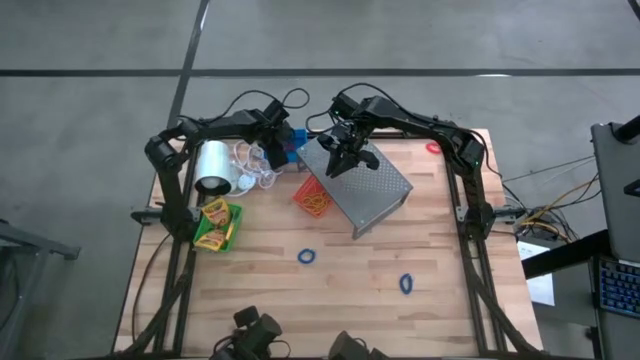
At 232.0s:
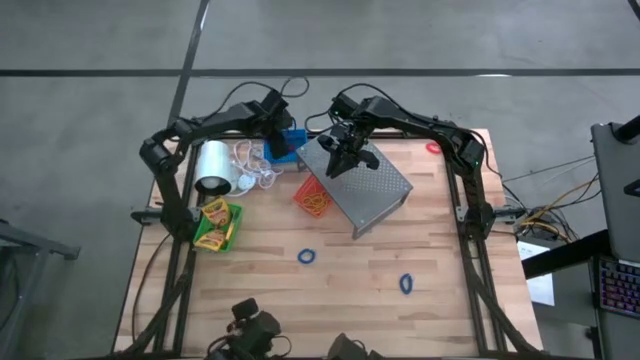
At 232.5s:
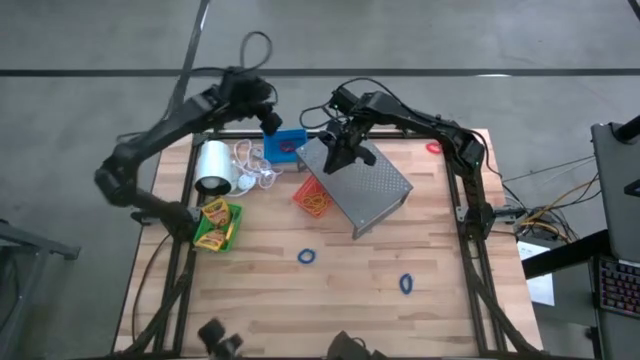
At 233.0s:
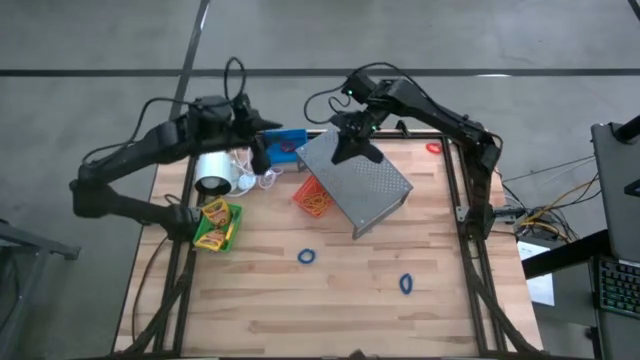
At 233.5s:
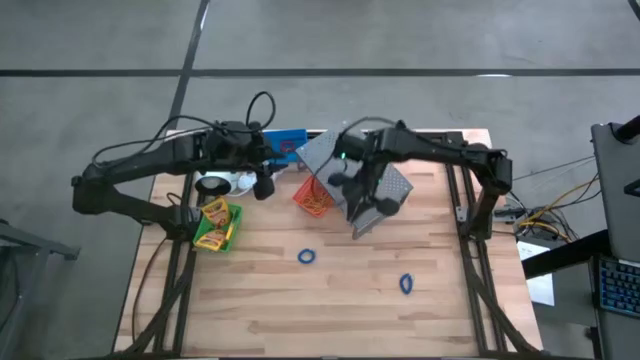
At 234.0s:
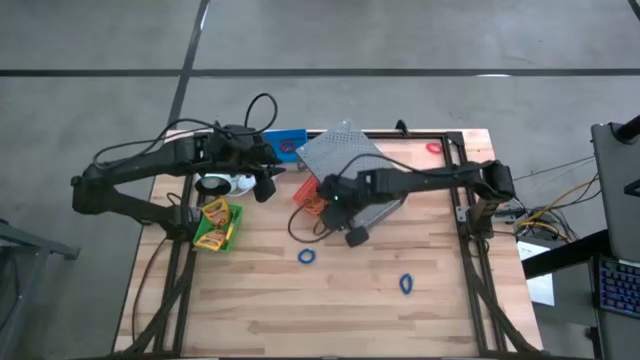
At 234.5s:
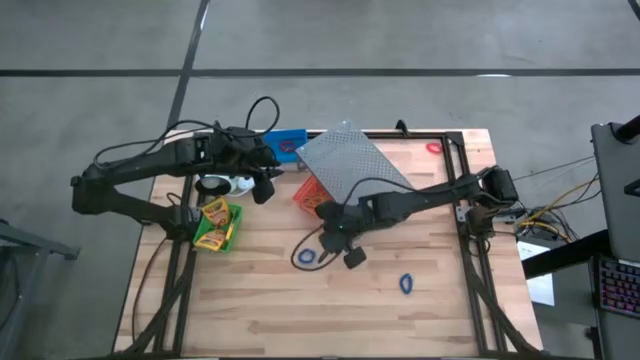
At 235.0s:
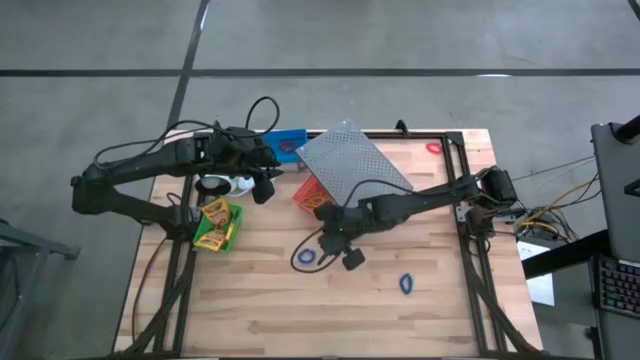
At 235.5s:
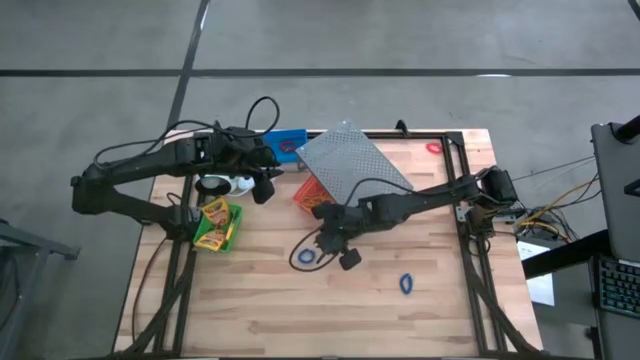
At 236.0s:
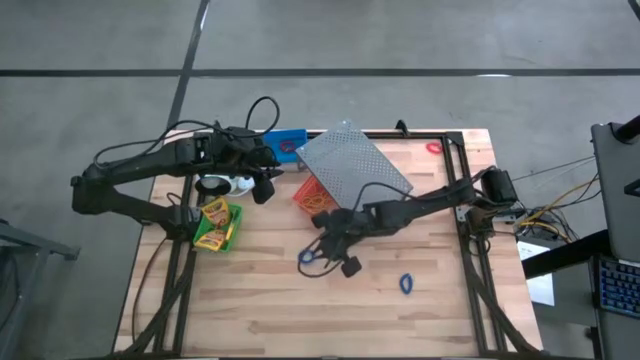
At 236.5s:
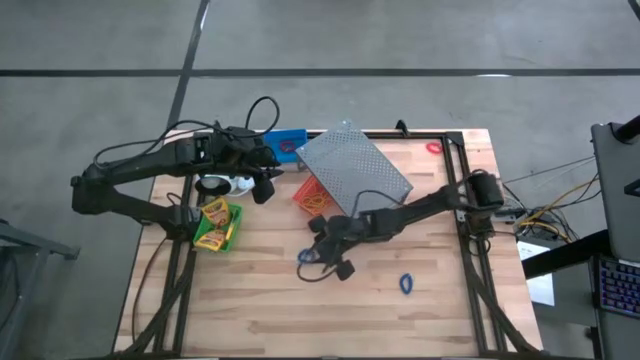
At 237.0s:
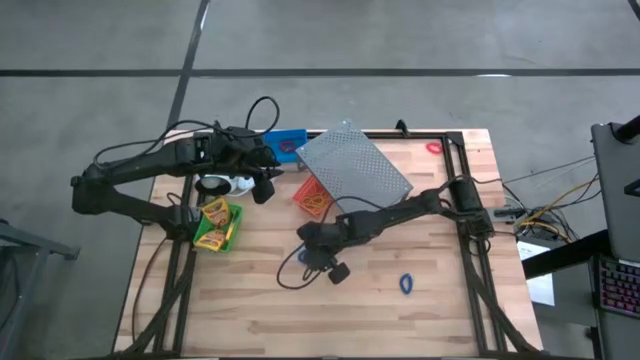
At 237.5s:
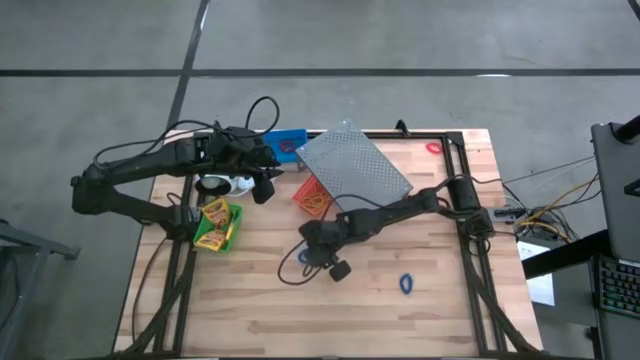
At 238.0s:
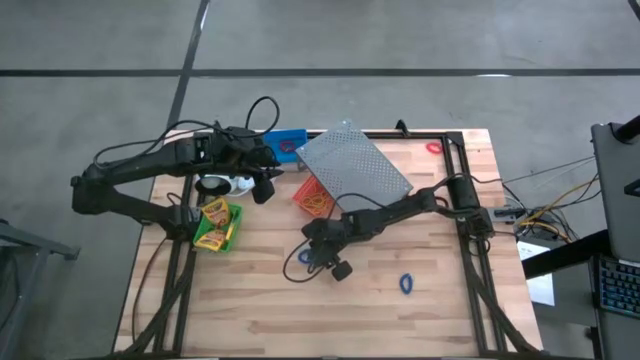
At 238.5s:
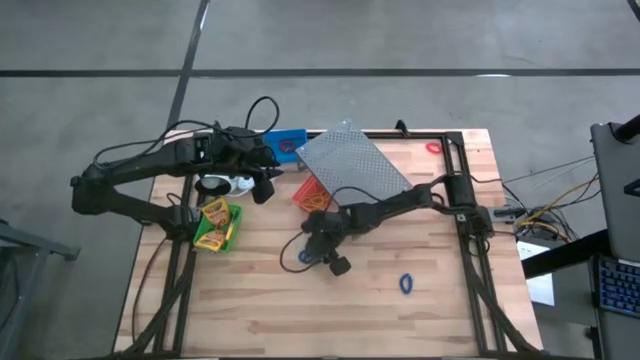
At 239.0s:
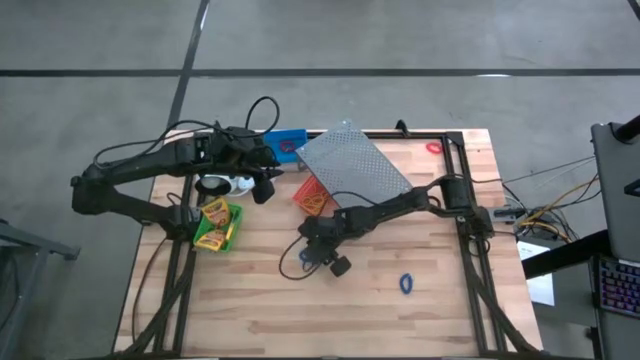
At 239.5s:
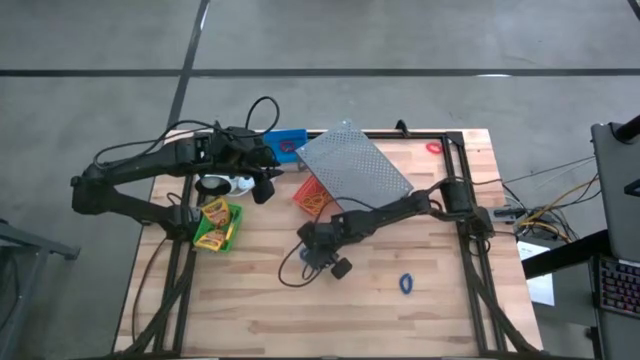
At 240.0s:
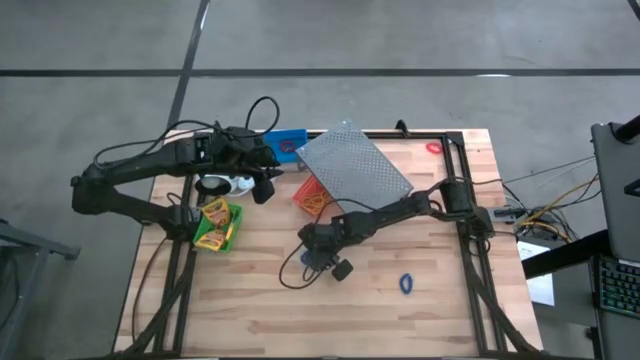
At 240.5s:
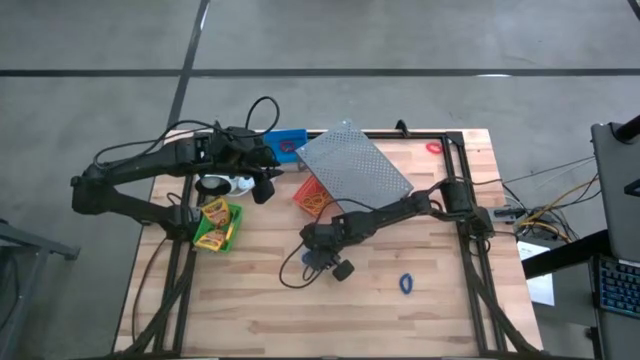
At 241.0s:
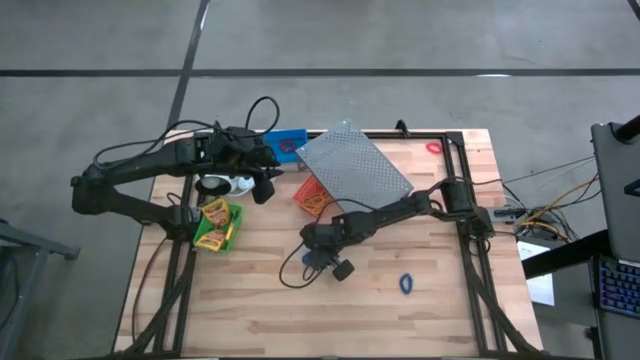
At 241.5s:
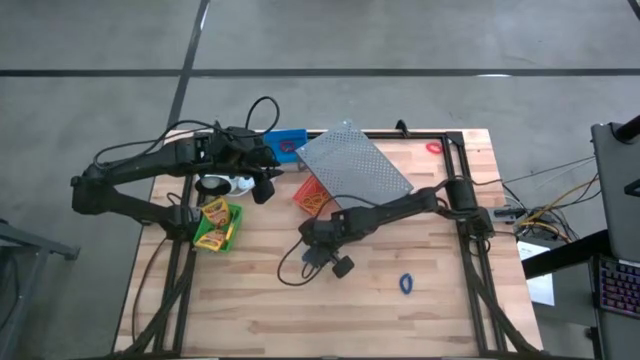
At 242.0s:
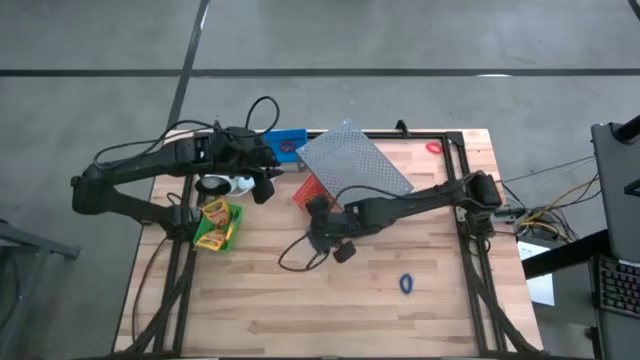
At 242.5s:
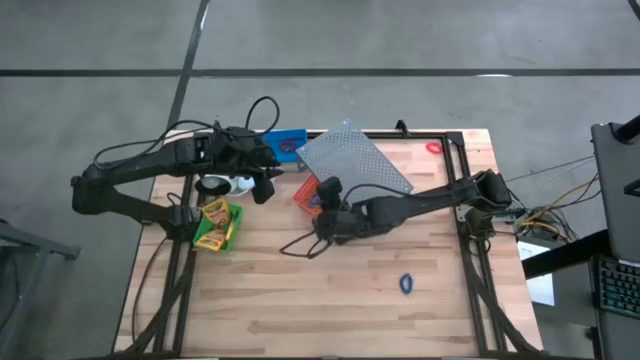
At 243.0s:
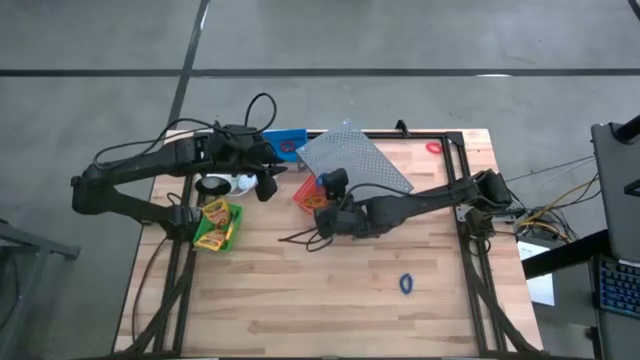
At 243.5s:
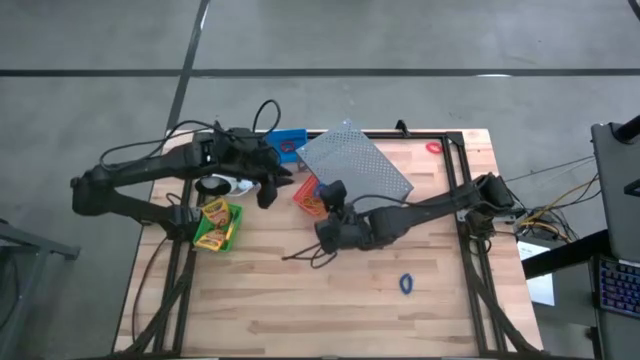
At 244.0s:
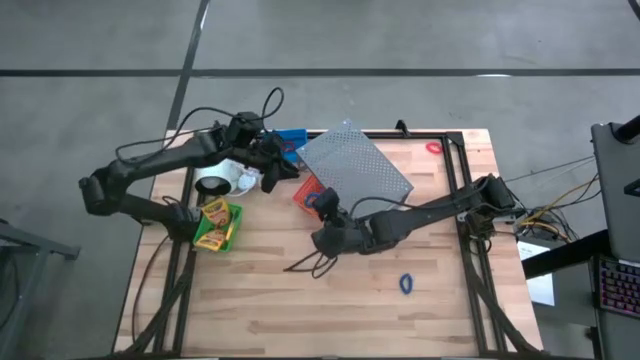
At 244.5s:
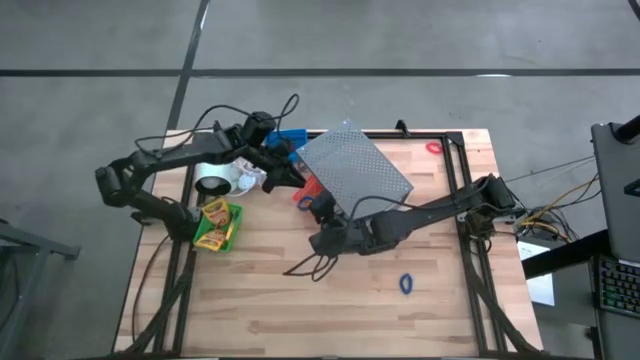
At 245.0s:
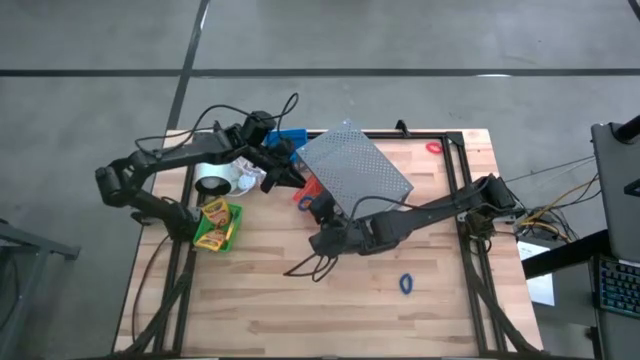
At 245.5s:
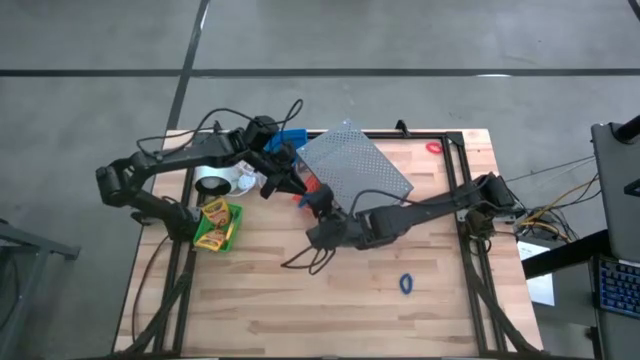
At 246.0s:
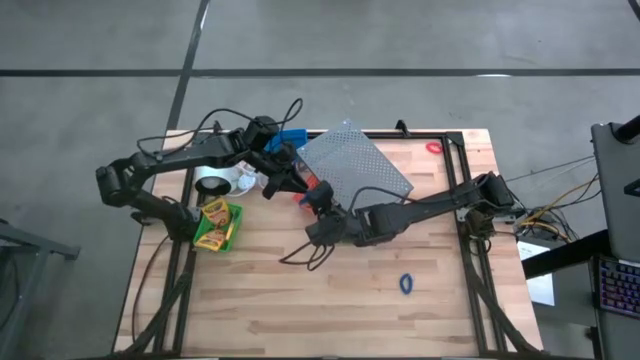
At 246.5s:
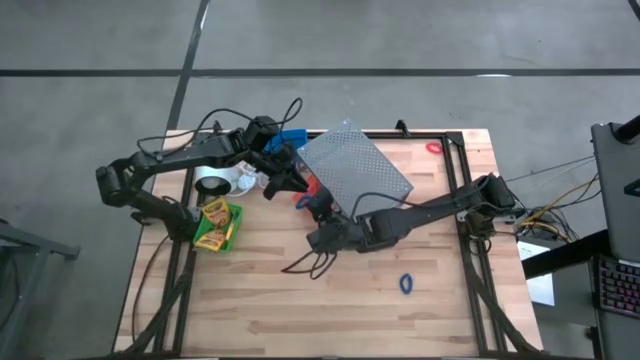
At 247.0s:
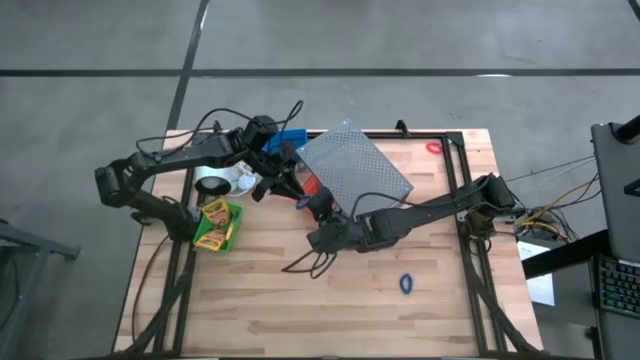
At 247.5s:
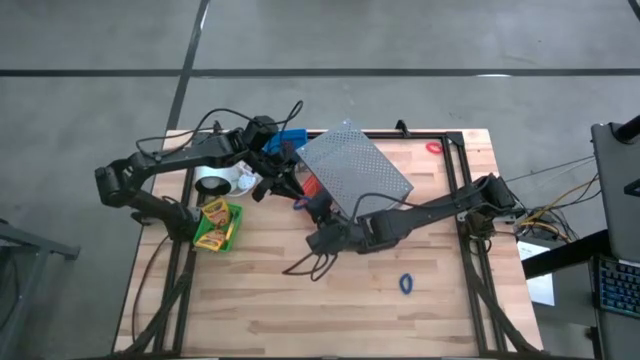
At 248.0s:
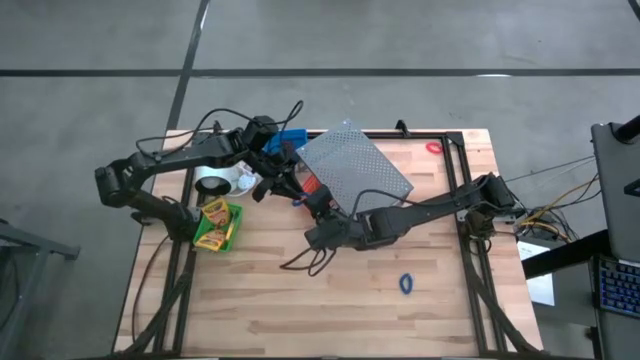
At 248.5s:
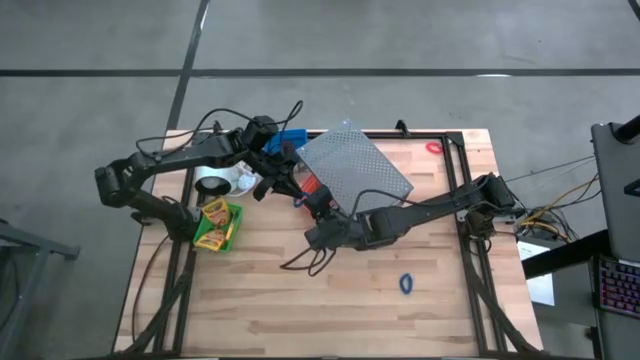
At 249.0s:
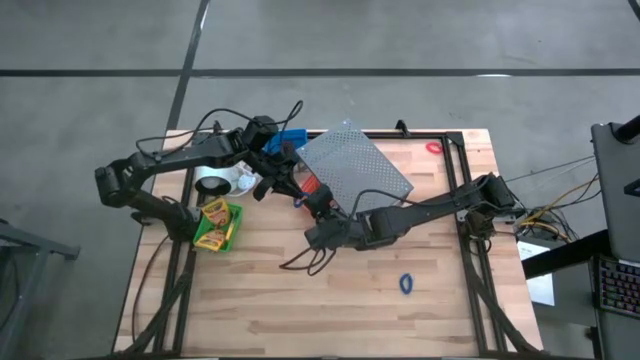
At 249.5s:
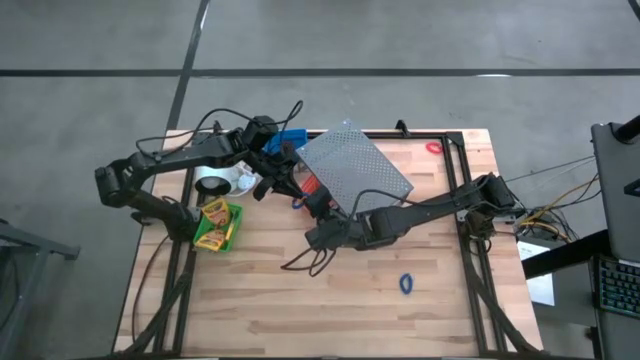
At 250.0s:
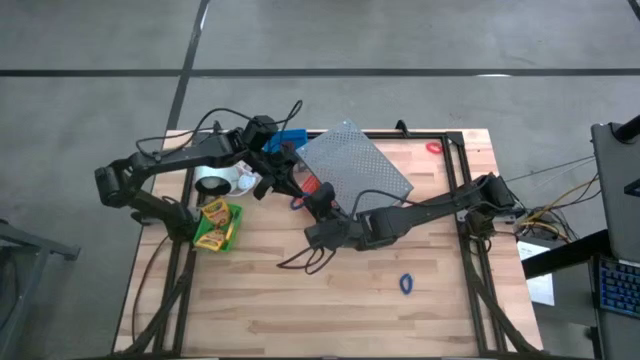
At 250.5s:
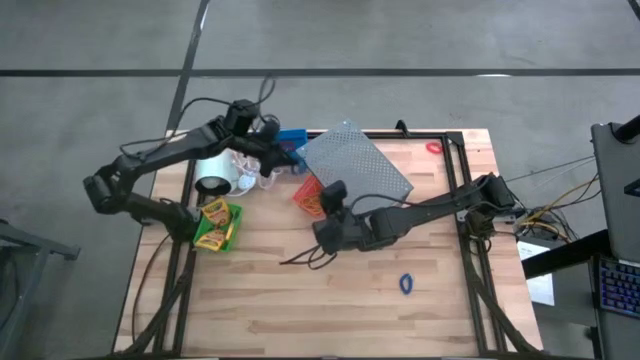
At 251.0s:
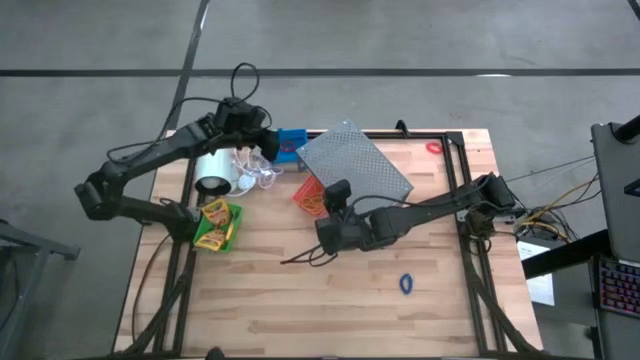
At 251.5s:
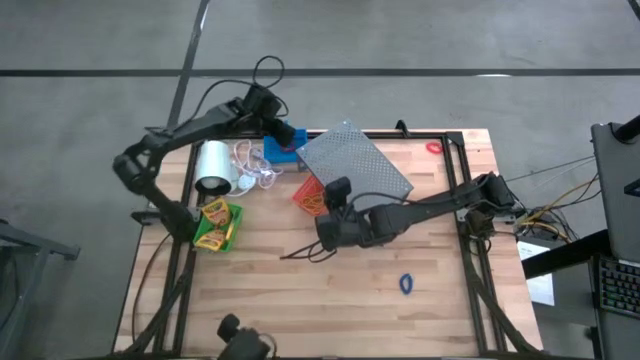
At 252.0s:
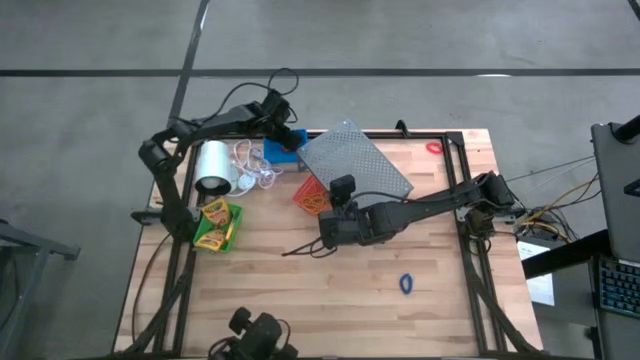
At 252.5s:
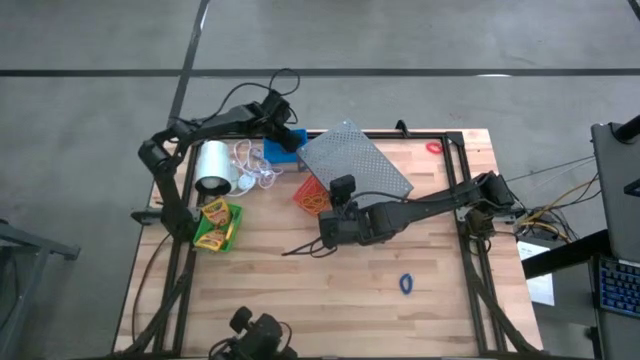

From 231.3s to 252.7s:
Task: Pick & Place Office Desk Supplies
Put the blue spring rubber band into the blue bin

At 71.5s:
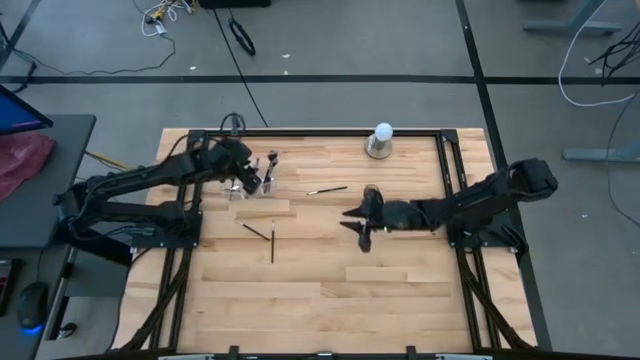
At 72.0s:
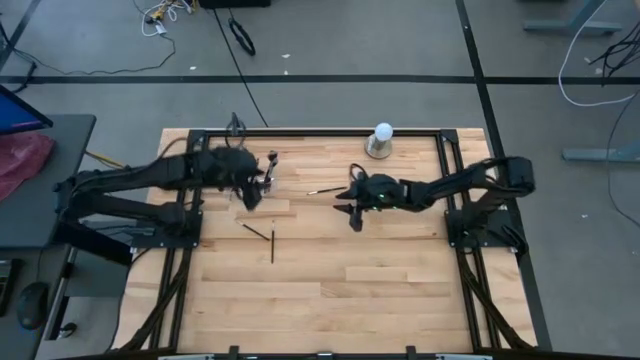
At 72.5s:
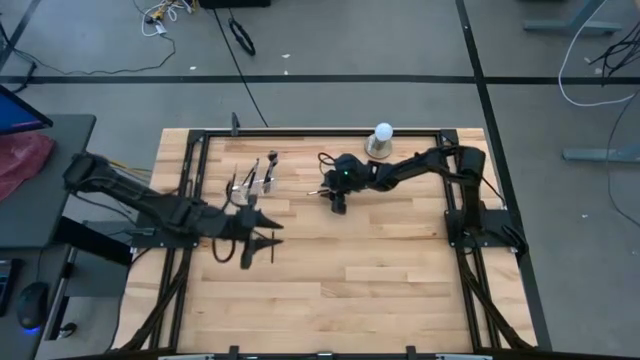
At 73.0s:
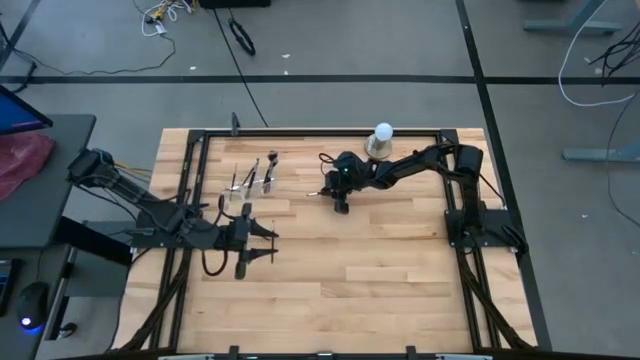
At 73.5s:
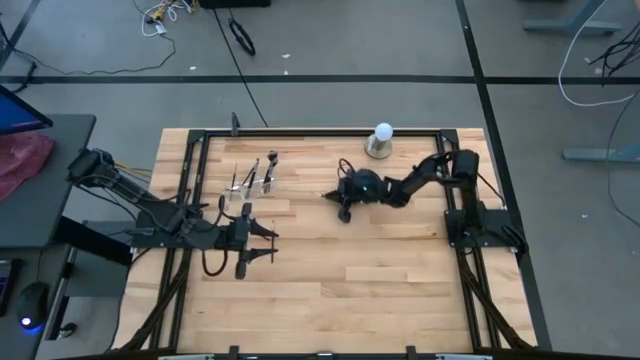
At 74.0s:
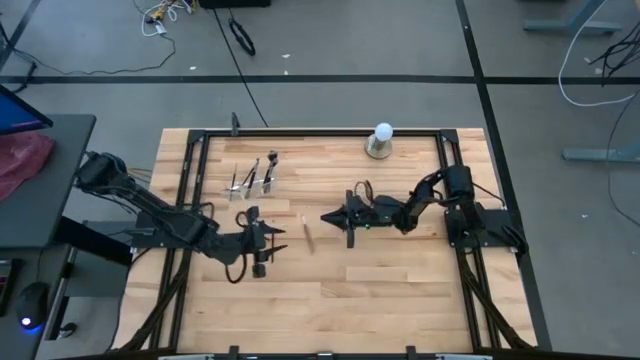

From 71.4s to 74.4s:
Task: Put items in baskets/containers
Put the black eyeshadow brush into the middle section of the transparent organizer
